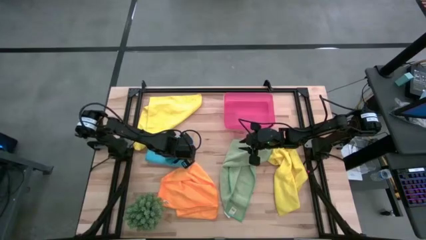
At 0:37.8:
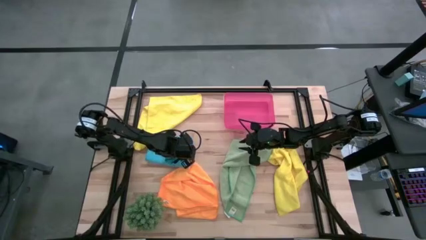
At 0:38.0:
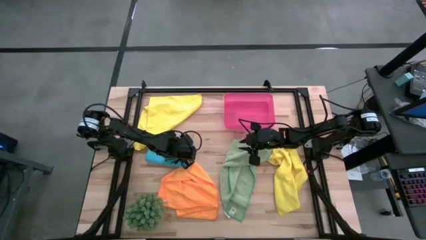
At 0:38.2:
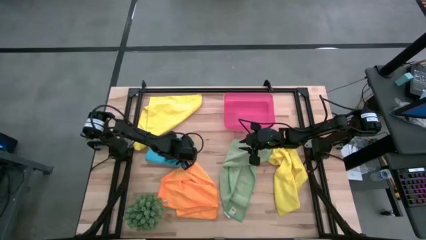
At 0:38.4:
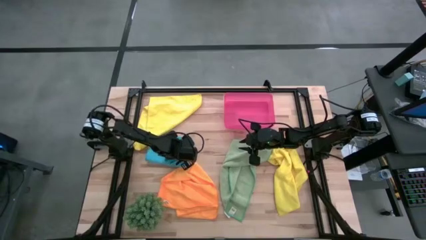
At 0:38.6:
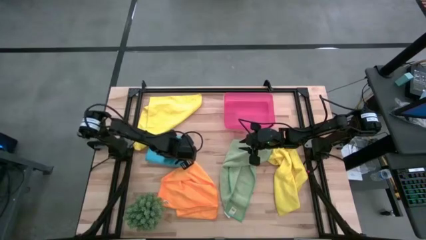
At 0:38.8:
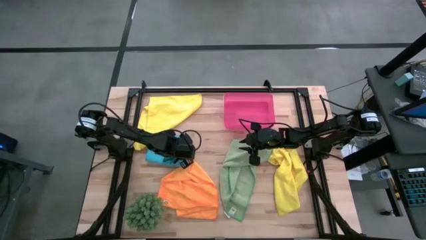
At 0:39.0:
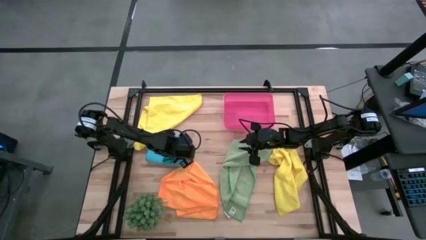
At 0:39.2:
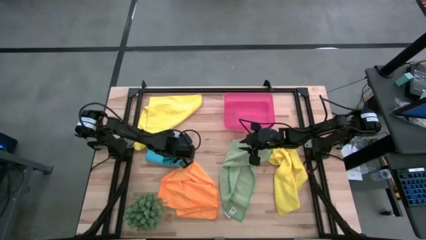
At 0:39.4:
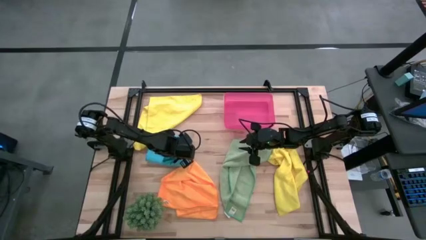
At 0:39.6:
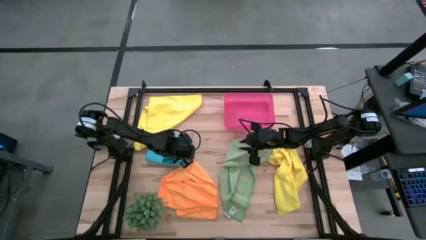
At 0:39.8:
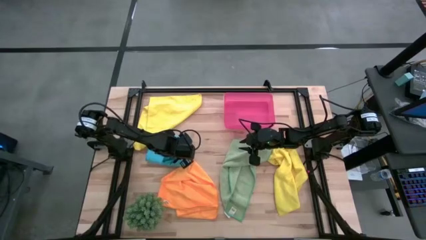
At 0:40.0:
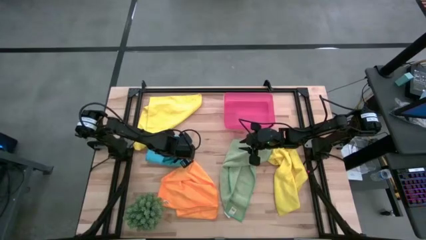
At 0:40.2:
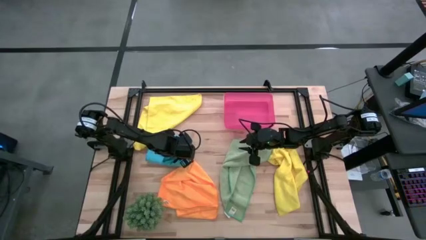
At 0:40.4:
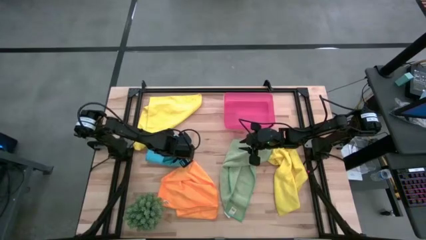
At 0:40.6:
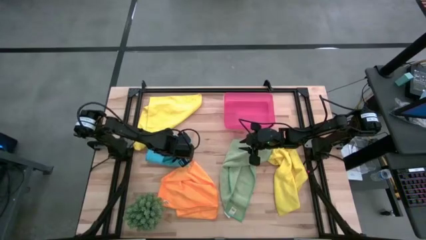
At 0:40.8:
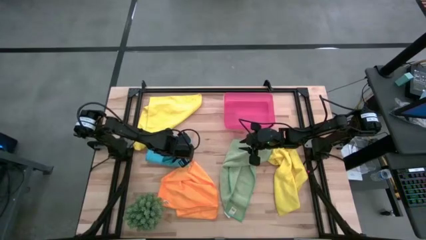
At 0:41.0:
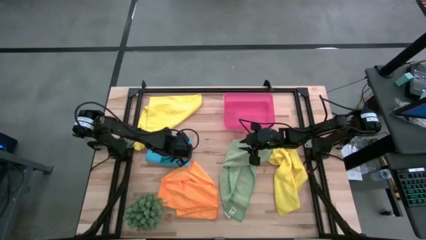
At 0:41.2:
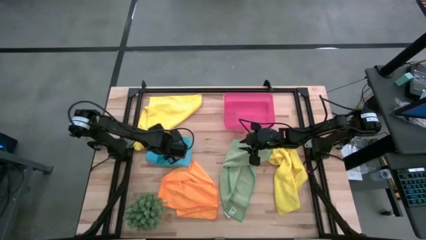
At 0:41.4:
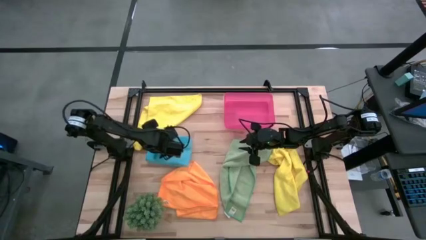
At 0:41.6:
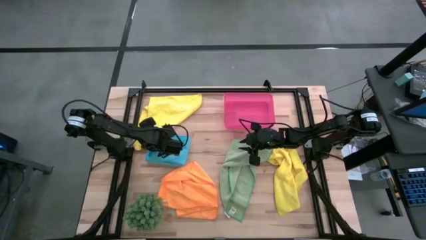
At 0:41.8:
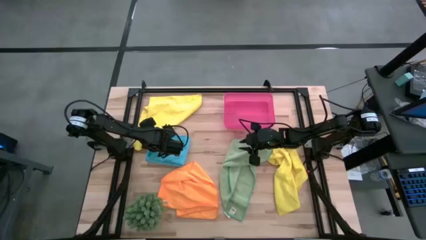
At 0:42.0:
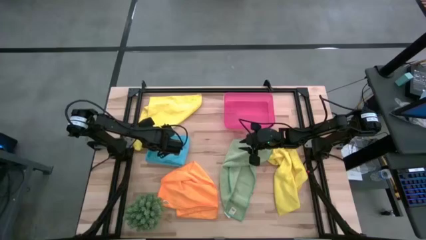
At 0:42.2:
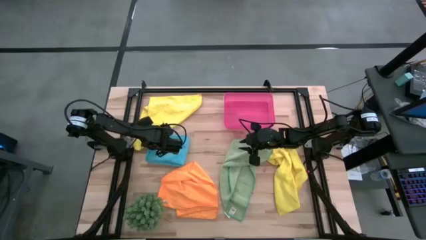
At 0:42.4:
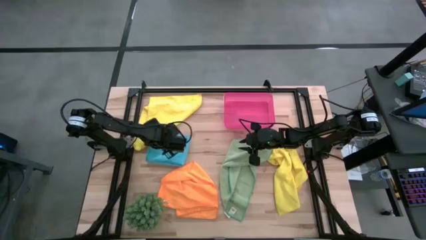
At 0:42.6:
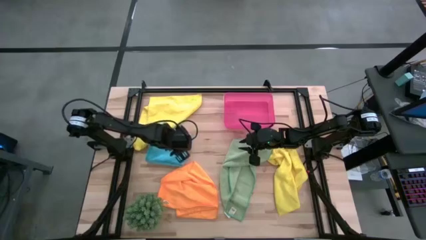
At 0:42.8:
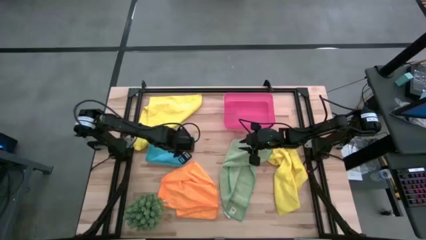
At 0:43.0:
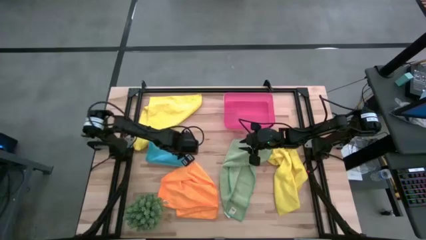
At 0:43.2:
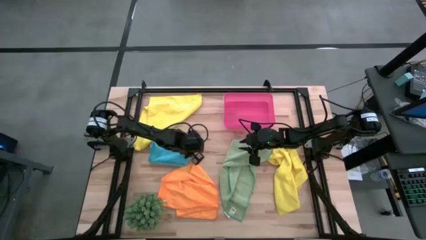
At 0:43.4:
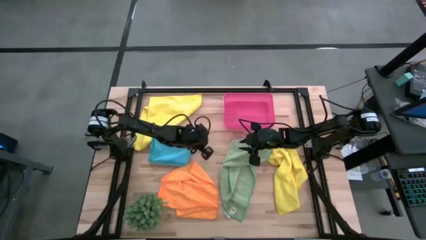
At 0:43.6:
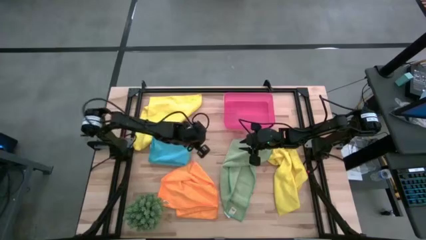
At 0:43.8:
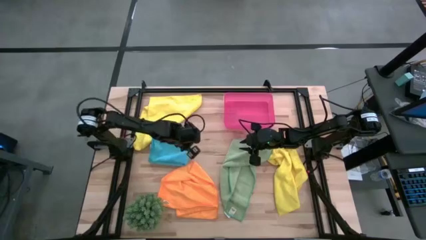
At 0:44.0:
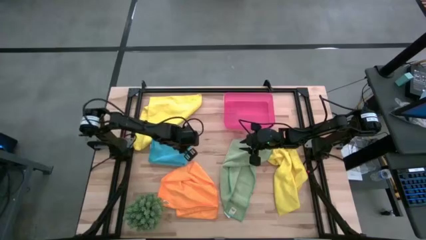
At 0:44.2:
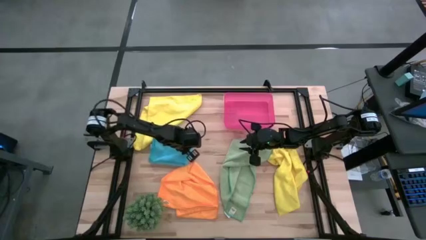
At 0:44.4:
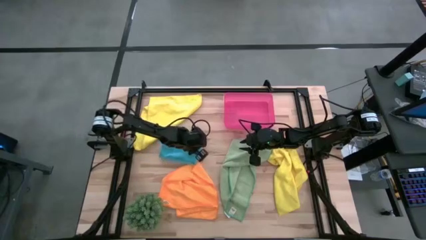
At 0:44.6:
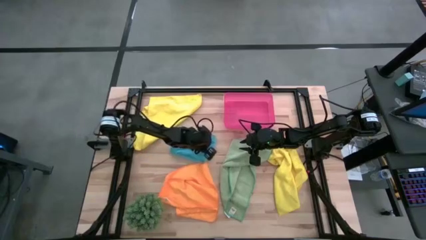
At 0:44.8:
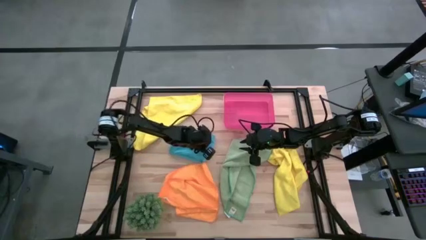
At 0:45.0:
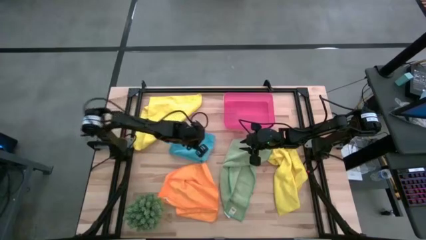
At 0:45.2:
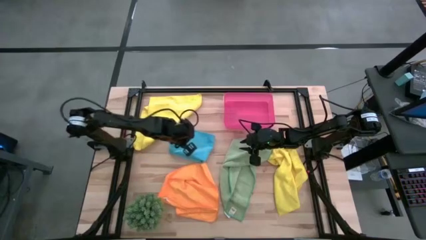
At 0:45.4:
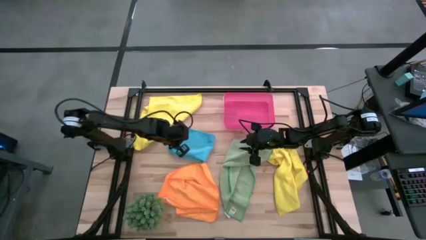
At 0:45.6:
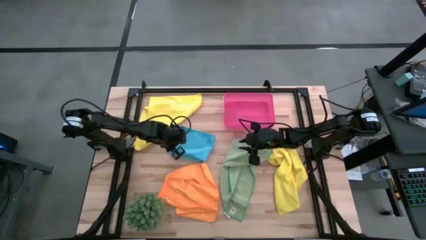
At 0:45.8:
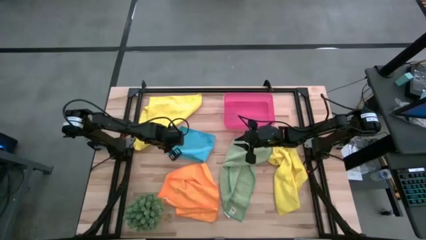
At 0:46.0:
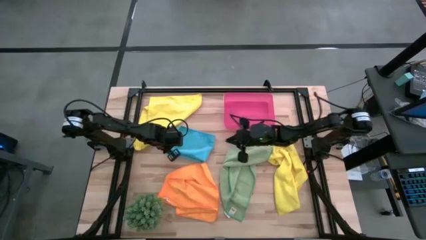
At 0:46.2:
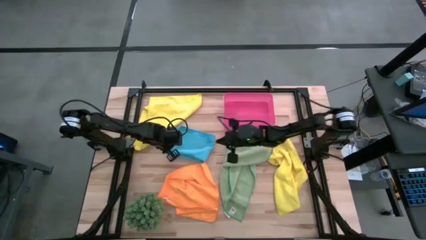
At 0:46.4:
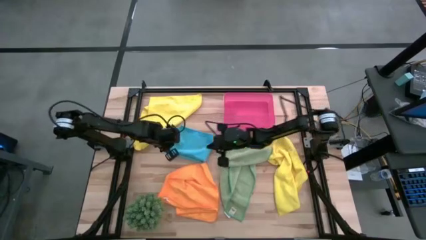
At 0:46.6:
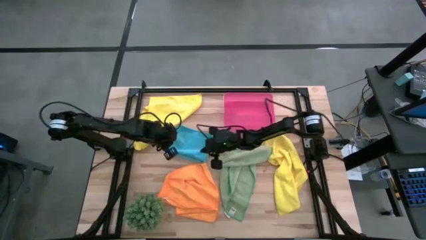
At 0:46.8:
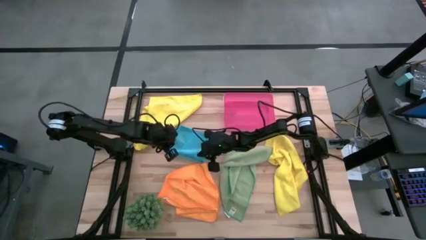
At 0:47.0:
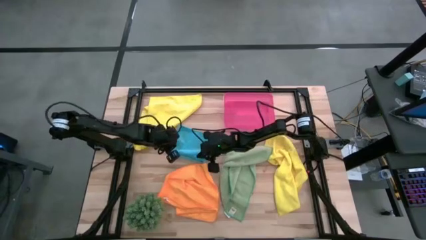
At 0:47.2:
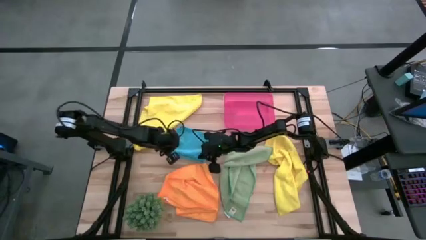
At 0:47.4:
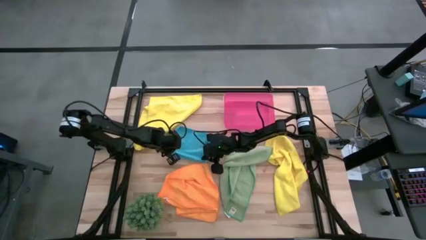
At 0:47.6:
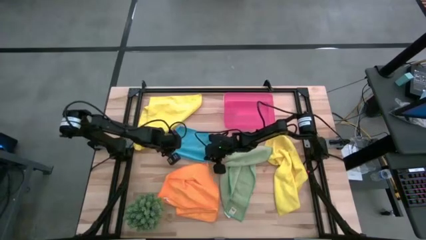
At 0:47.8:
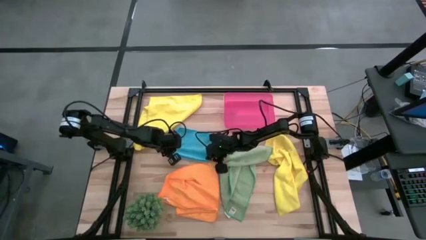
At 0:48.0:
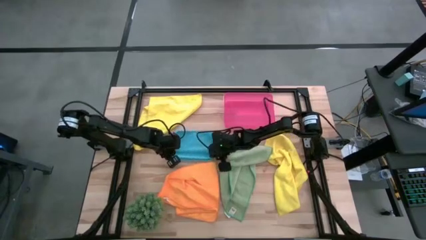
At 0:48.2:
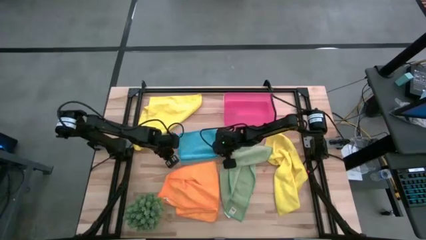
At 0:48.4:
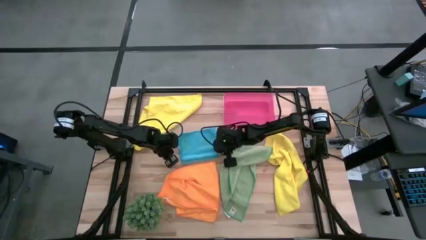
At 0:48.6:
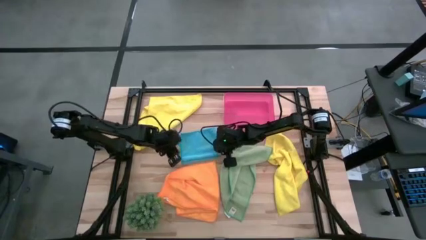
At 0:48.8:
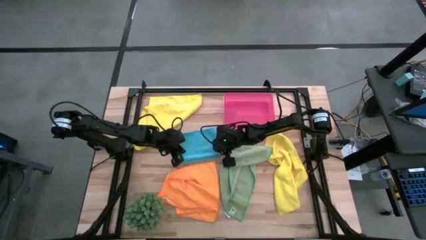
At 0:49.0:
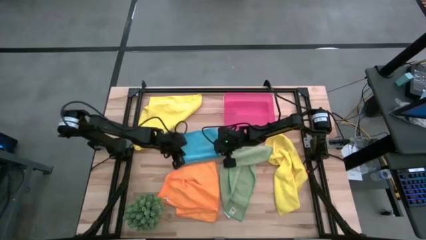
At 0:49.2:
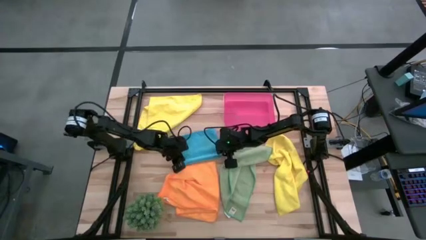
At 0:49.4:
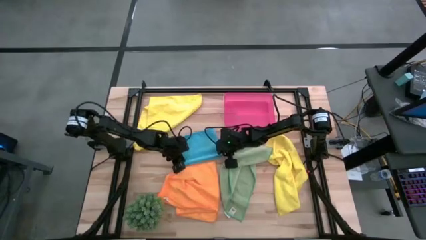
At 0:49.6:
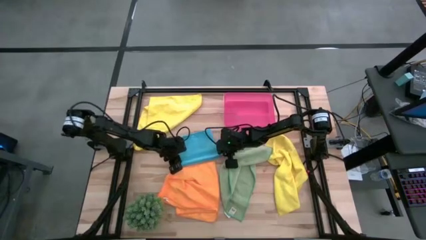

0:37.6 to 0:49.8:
Task: Fold microfiber towels
Fold the blue microfiber cloth
